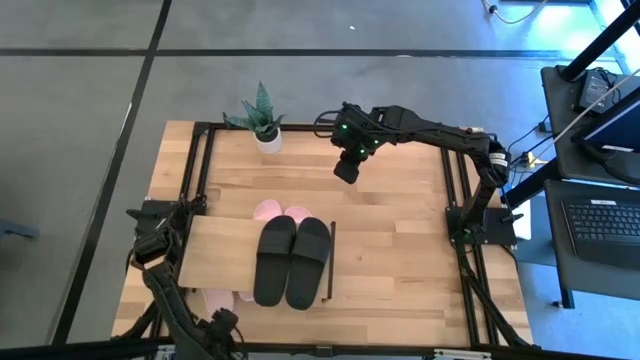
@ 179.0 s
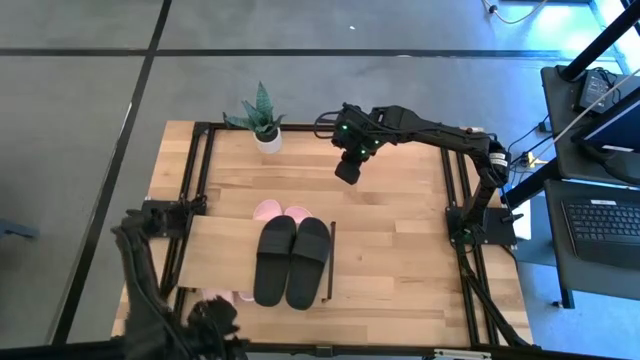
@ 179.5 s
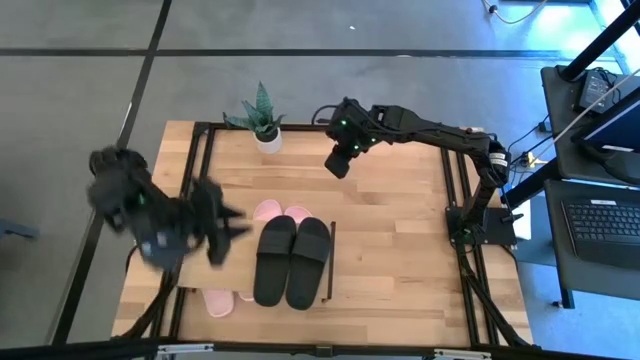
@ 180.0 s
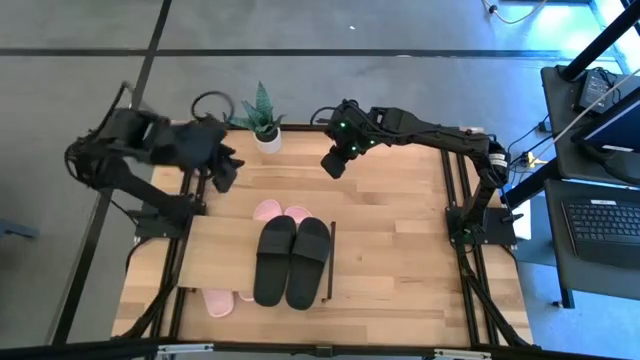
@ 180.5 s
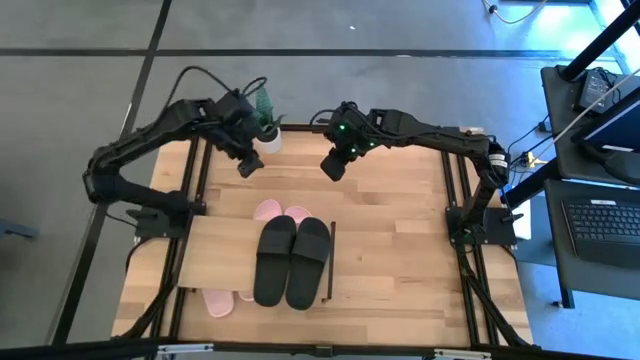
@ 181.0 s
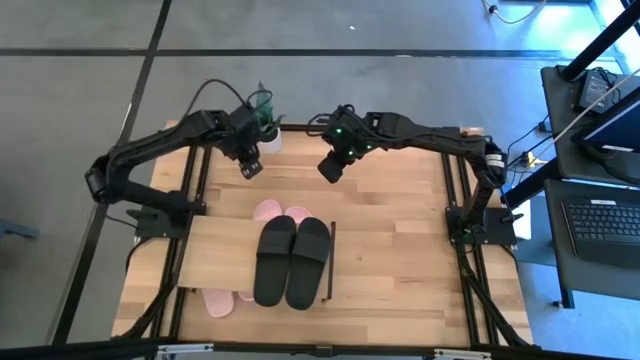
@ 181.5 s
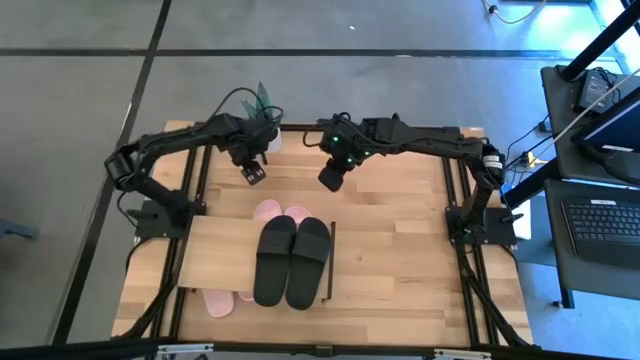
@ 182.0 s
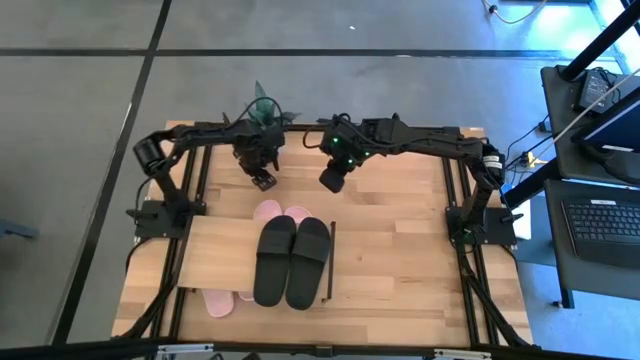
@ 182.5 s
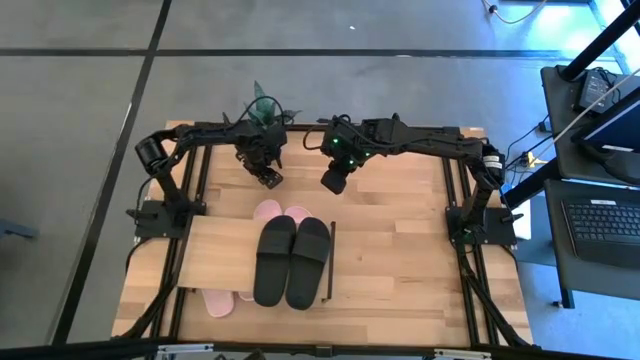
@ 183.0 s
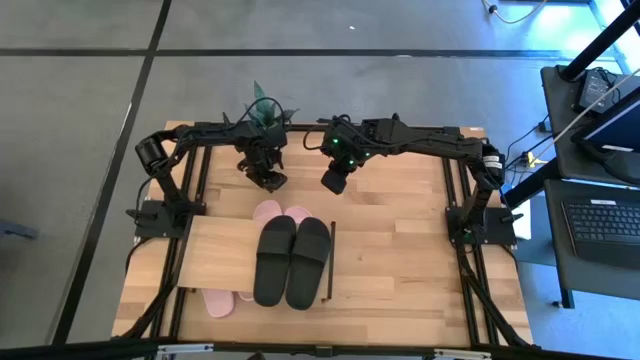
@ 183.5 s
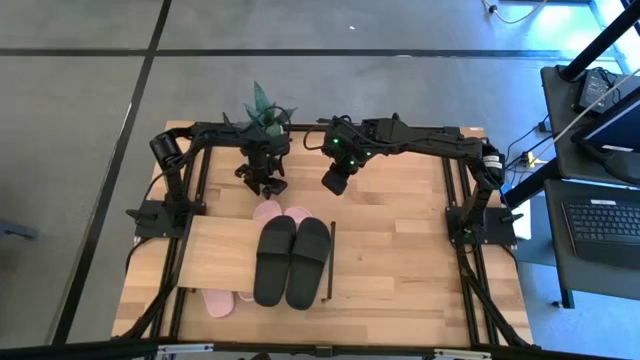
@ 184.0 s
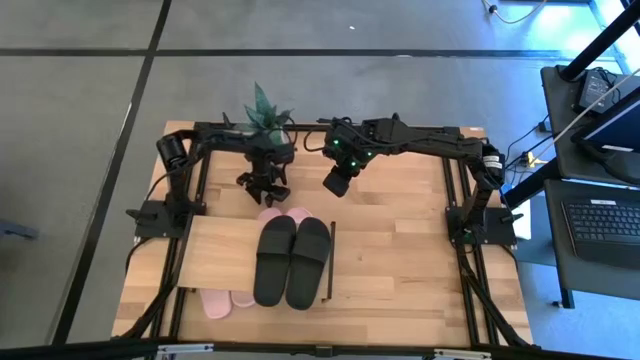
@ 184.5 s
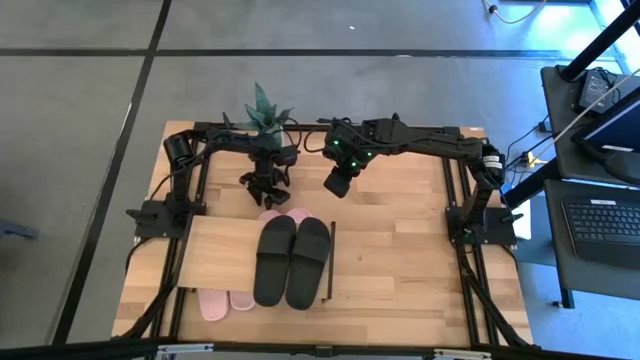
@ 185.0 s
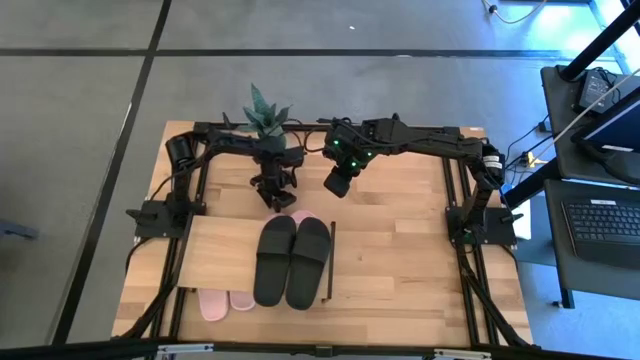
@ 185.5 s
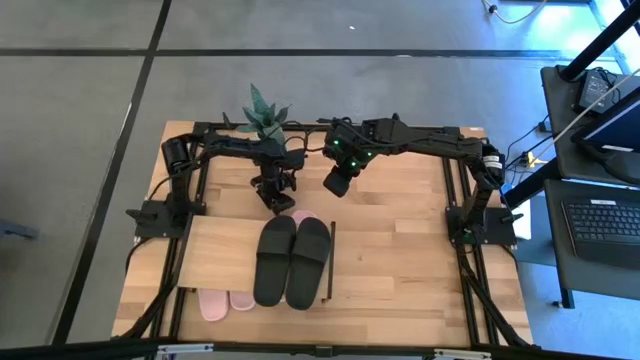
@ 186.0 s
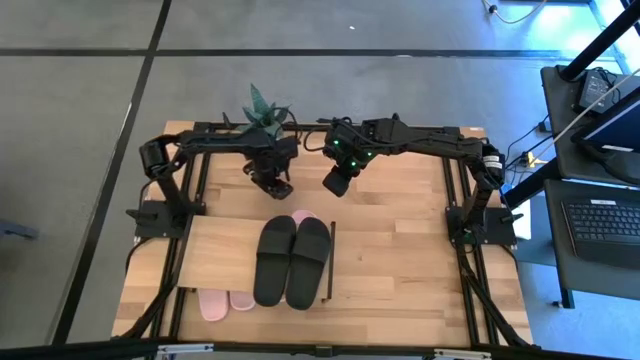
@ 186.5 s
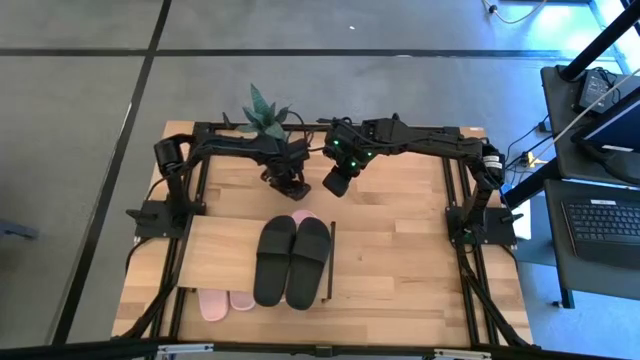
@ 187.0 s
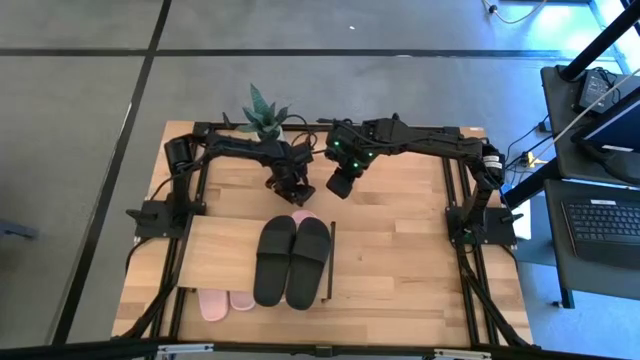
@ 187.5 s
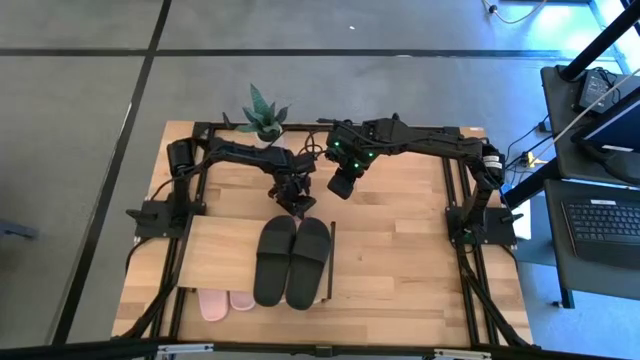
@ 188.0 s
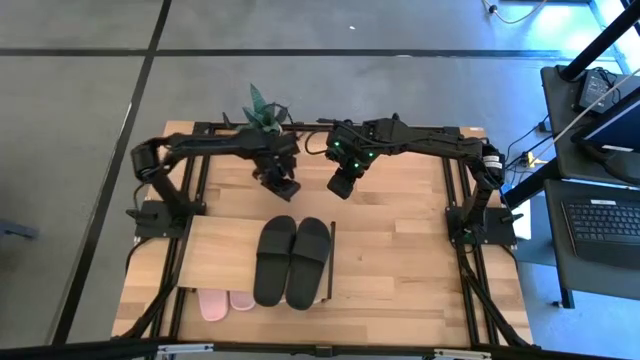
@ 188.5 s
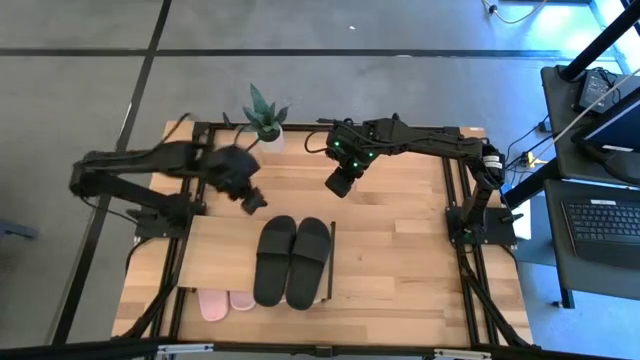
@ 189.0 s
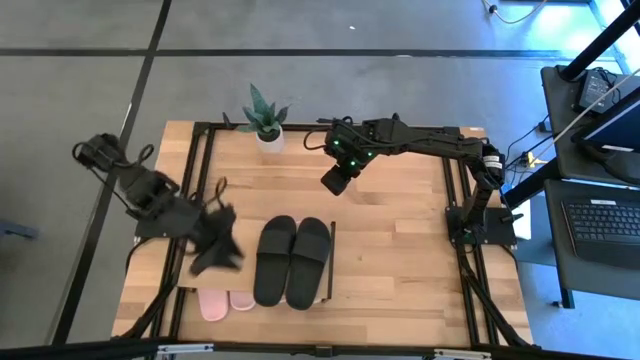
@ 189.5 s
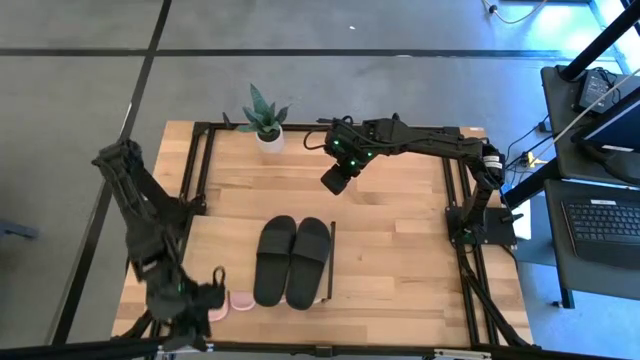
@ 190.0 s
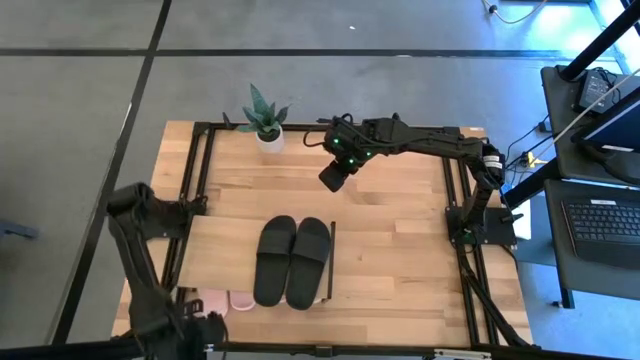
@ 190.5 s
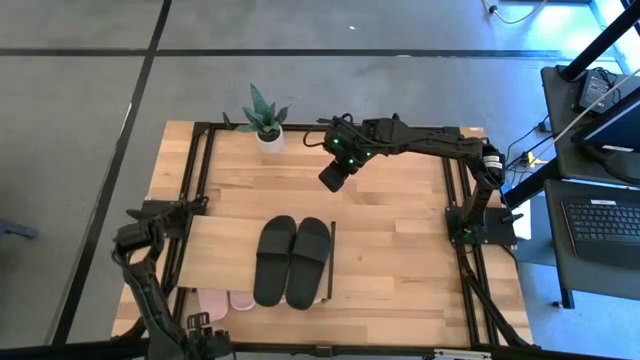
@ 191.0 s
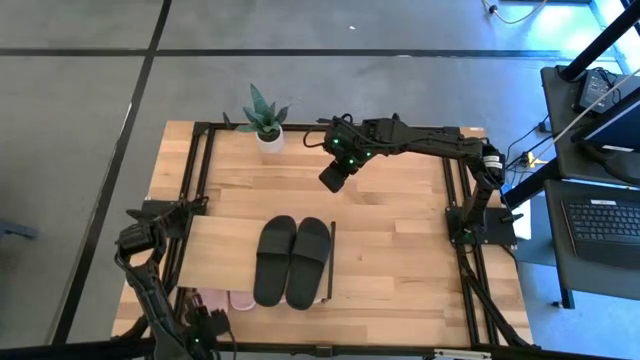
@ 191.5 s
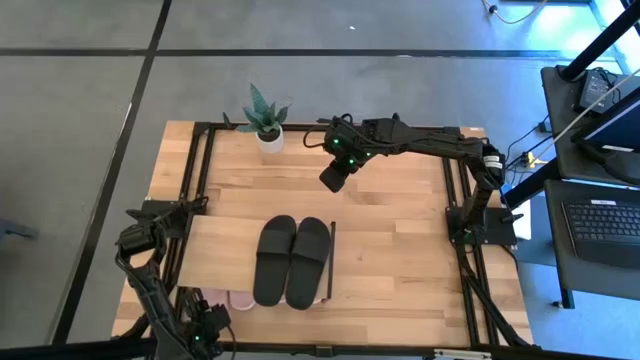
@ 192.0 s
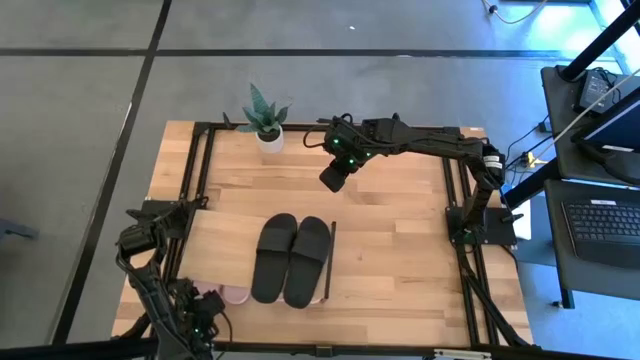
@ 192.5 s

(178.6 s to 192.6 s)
Task: Pick and place slides into the shelf
Adjust the pink slides under the shelf

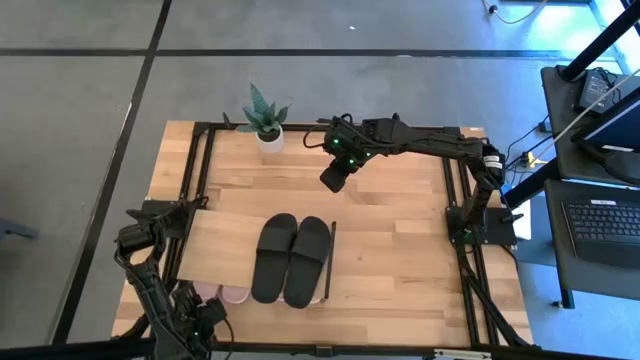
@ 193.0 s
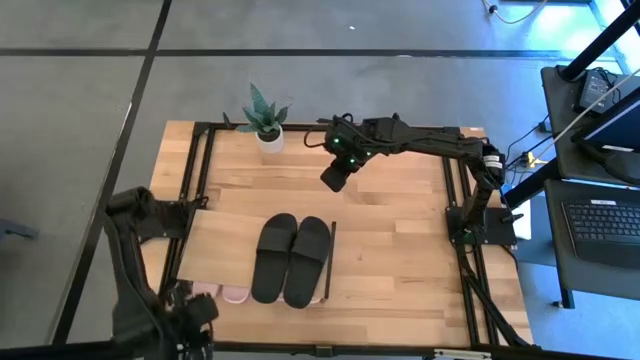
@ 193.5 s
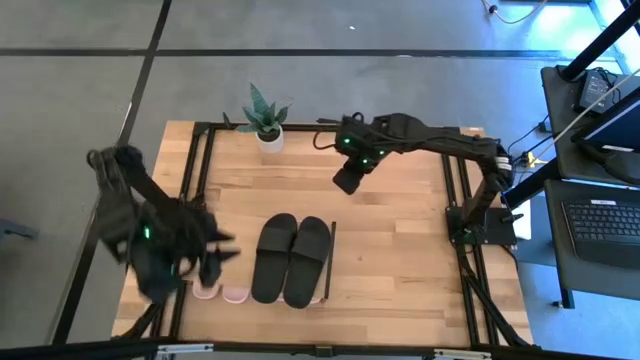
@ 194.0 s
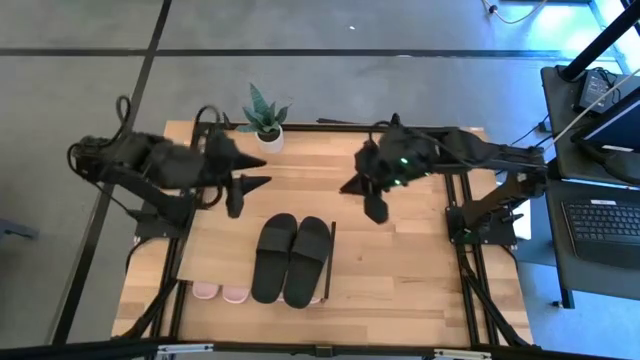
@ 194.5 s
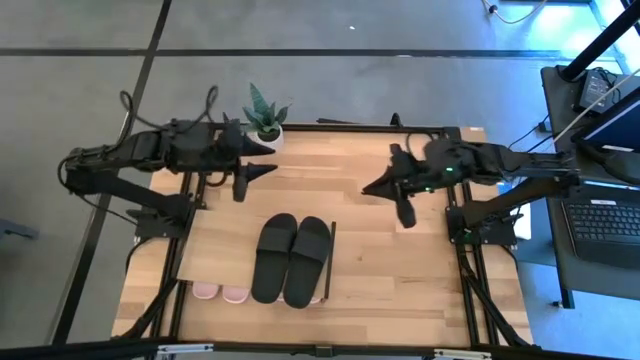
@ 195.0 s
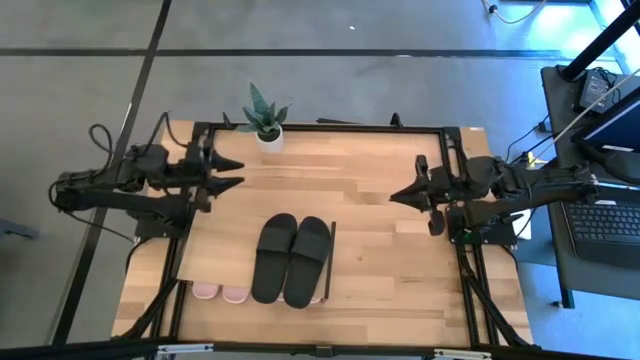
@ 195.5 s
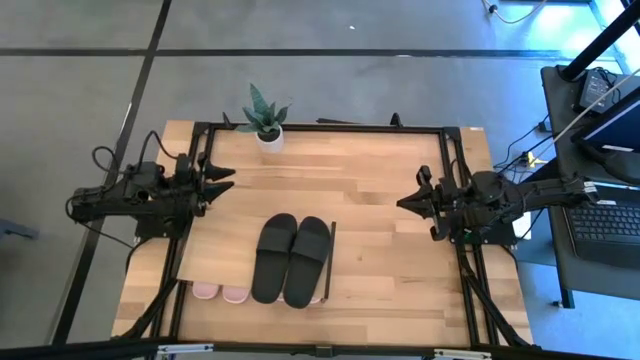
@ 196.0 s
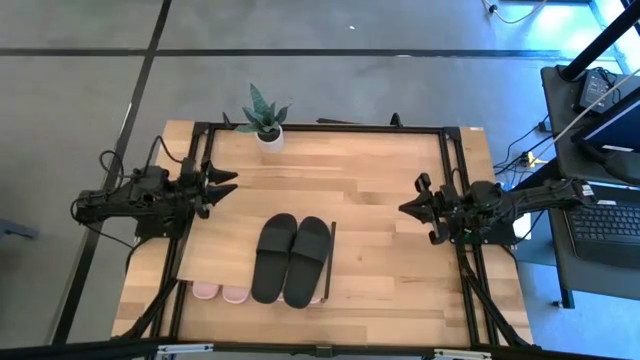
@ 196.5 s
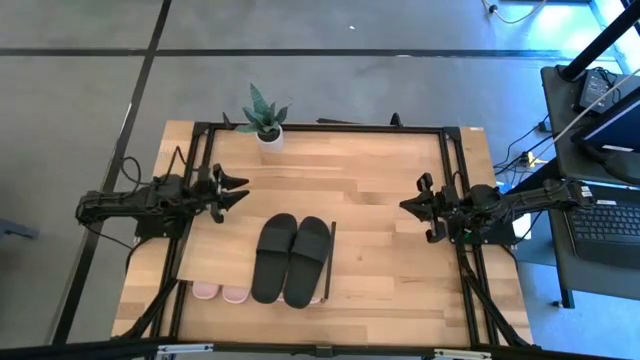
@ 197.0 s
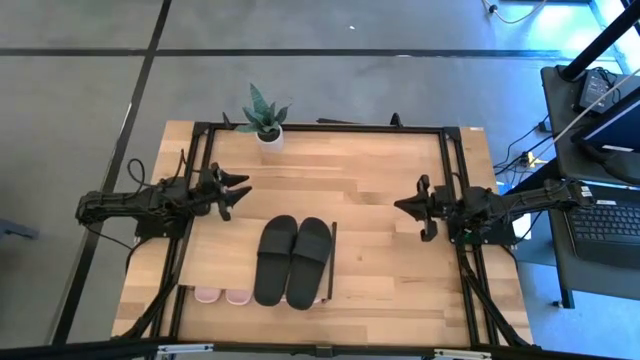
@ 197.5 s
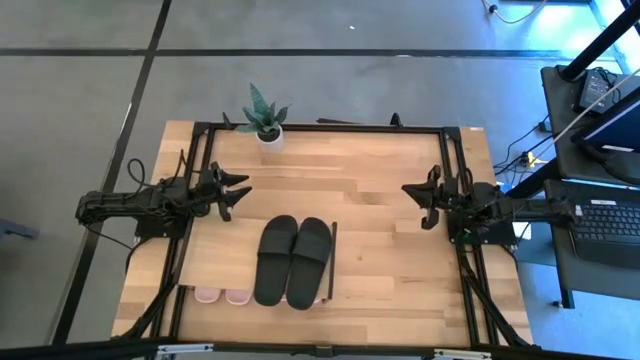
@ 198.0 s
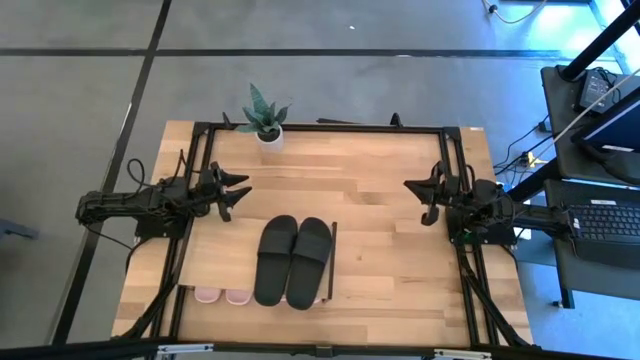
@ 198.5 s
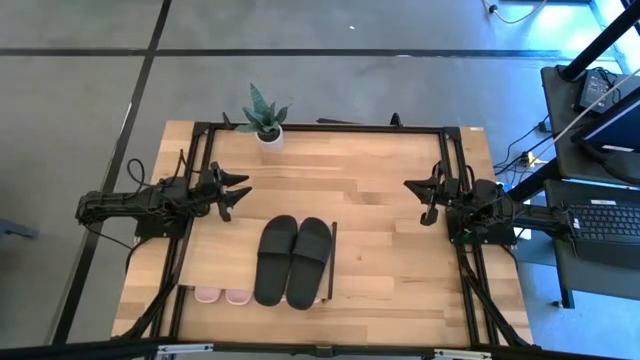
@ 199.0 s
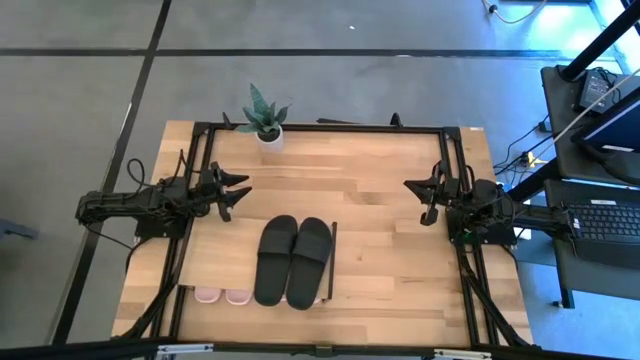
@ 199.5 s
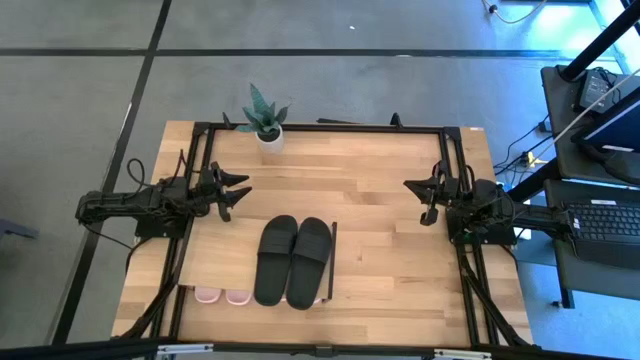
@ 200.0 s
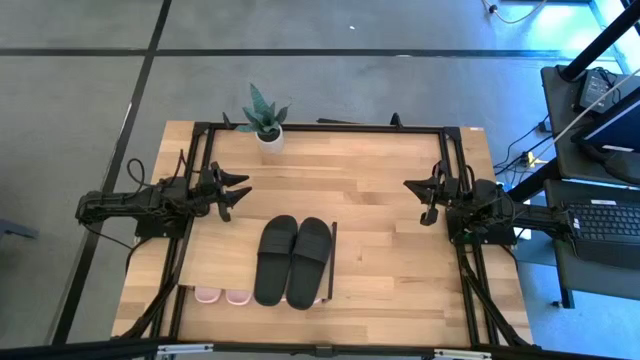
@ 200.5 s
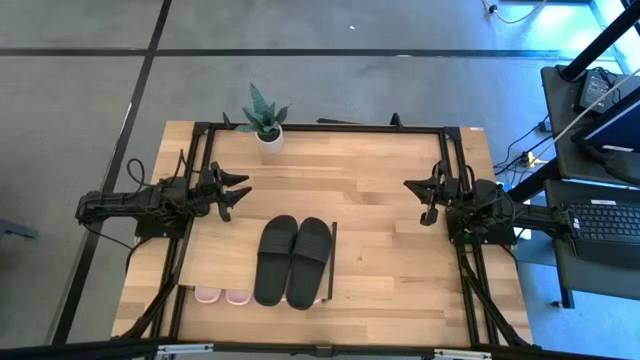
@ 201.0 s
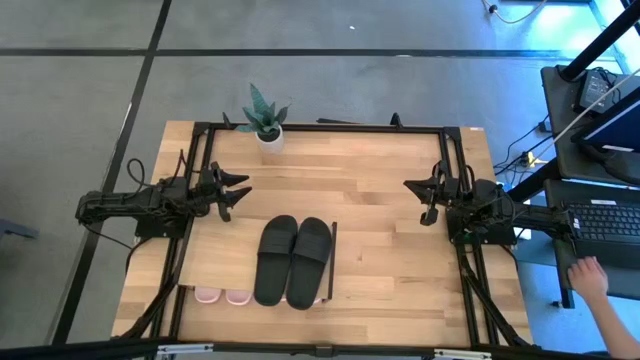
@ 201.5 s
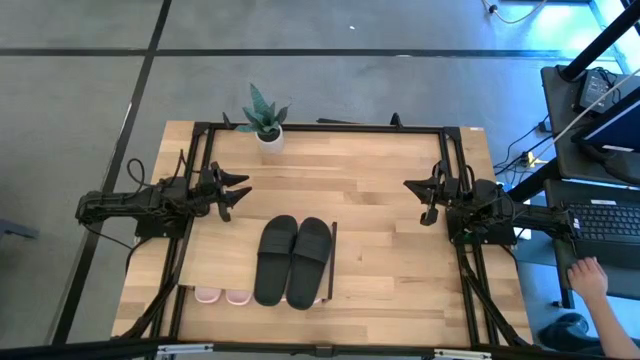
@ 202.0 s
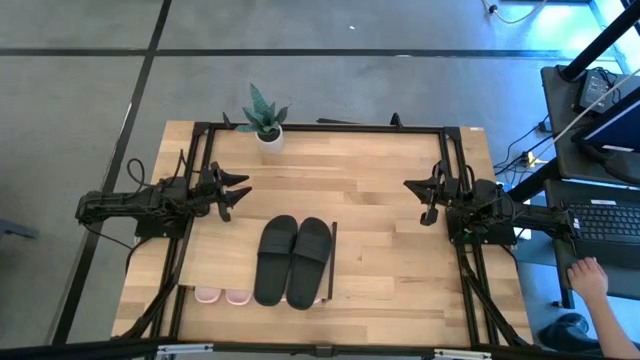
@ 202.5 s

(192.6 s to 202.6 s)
Return to Home Position
